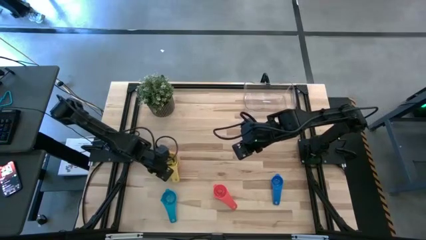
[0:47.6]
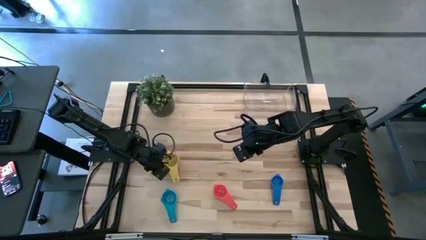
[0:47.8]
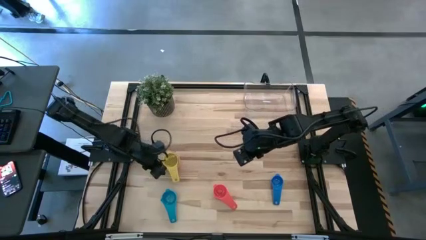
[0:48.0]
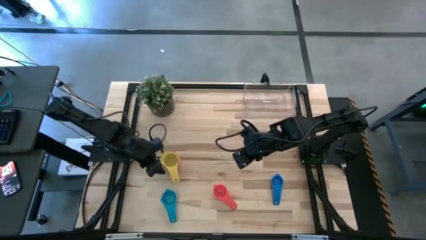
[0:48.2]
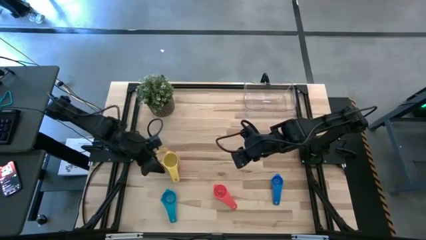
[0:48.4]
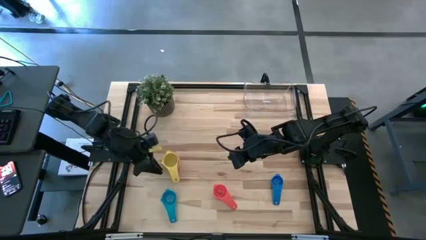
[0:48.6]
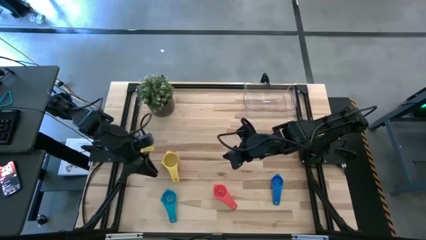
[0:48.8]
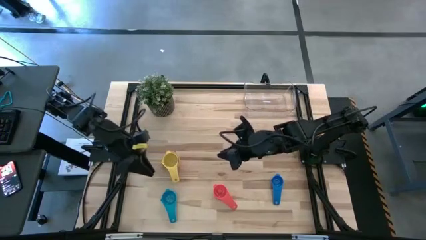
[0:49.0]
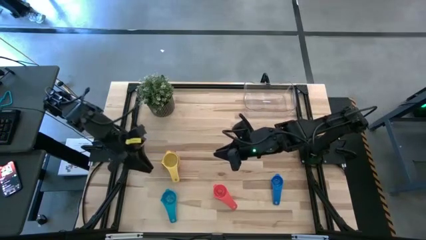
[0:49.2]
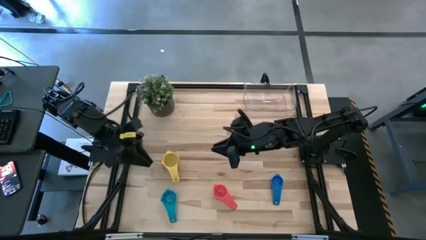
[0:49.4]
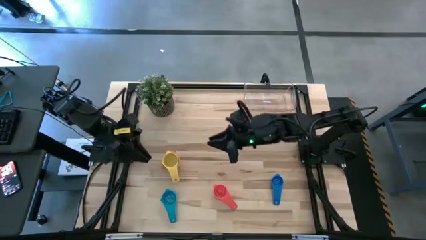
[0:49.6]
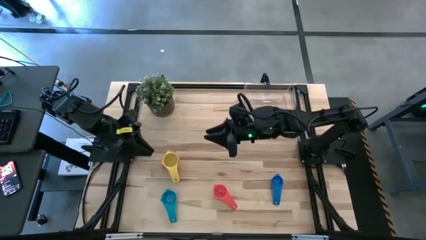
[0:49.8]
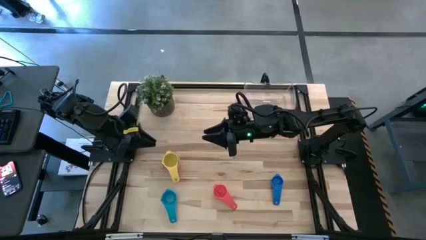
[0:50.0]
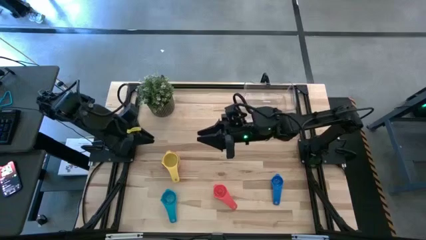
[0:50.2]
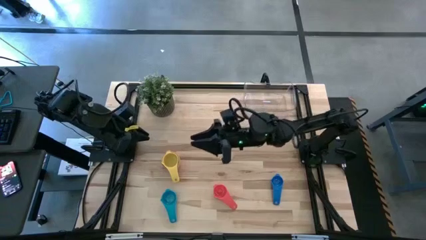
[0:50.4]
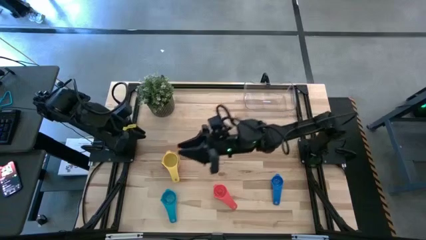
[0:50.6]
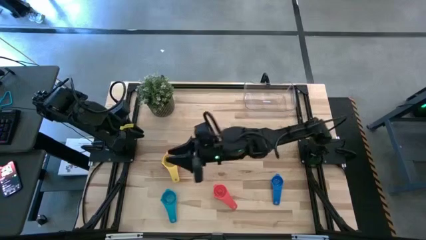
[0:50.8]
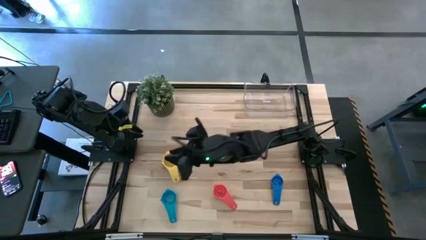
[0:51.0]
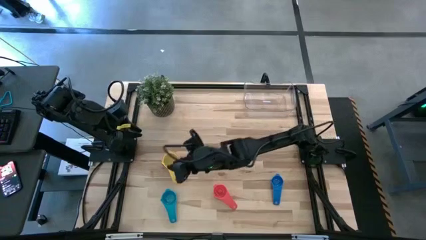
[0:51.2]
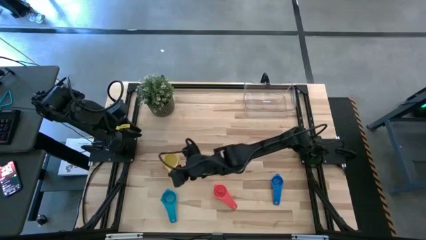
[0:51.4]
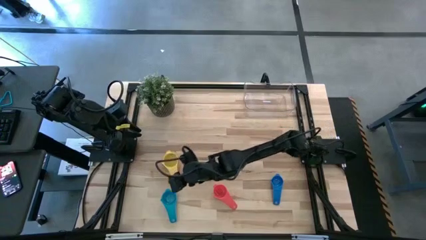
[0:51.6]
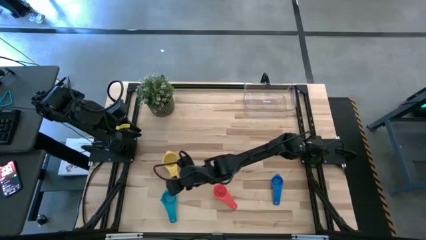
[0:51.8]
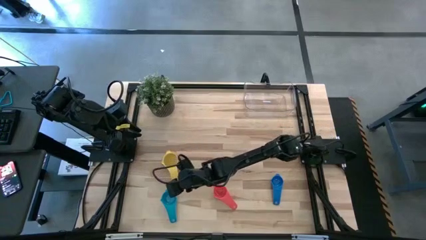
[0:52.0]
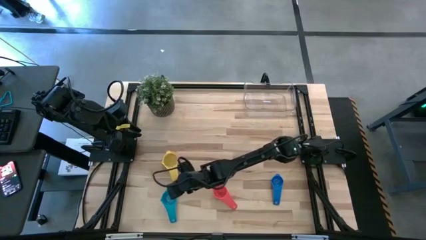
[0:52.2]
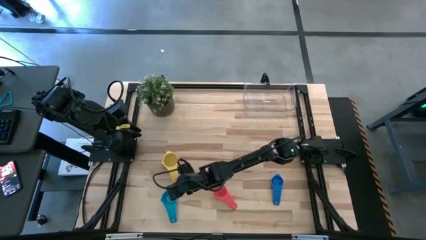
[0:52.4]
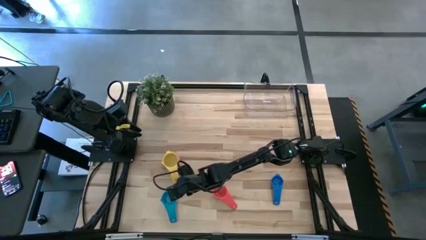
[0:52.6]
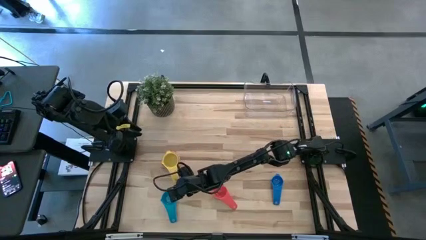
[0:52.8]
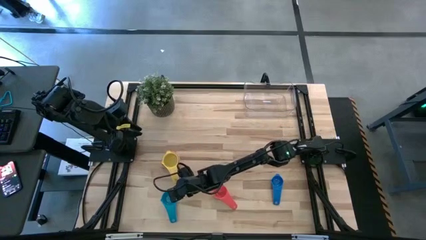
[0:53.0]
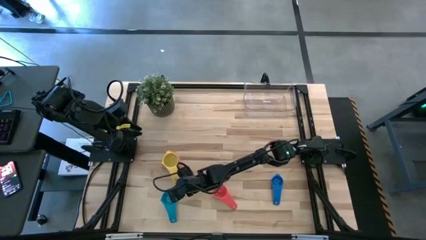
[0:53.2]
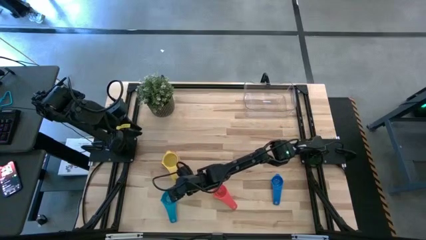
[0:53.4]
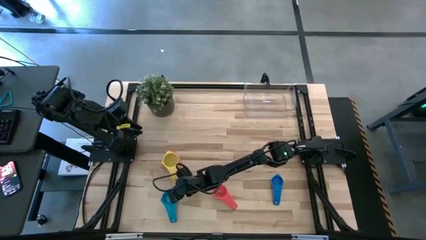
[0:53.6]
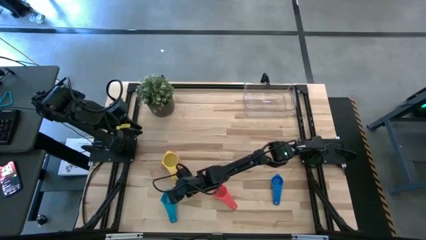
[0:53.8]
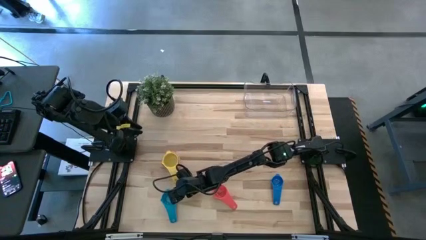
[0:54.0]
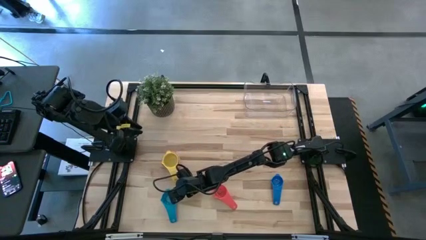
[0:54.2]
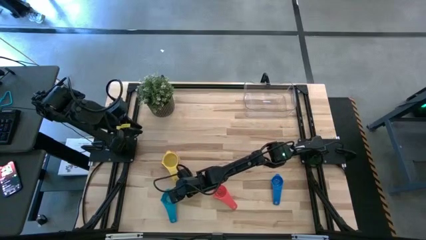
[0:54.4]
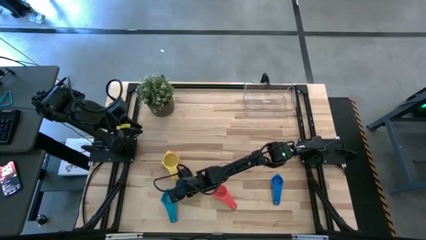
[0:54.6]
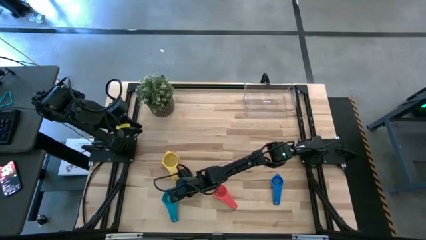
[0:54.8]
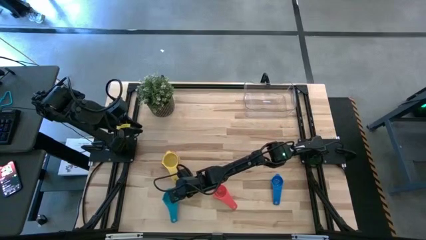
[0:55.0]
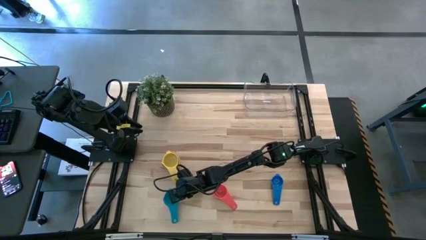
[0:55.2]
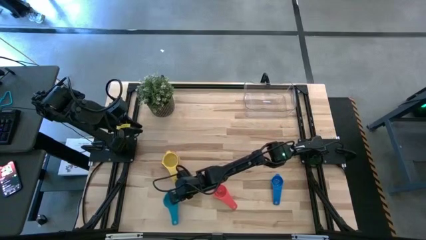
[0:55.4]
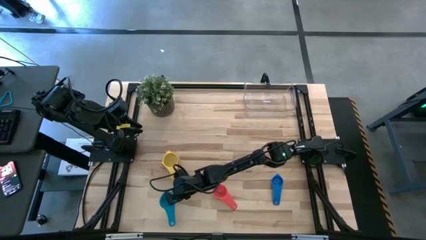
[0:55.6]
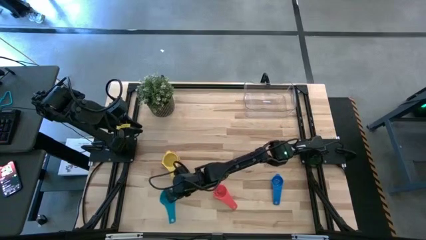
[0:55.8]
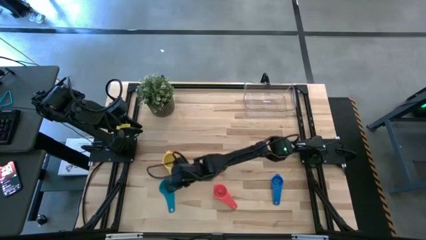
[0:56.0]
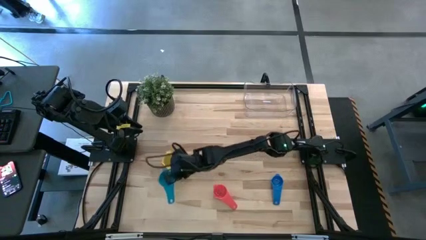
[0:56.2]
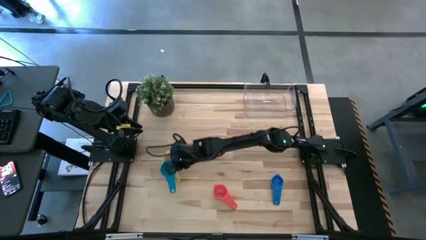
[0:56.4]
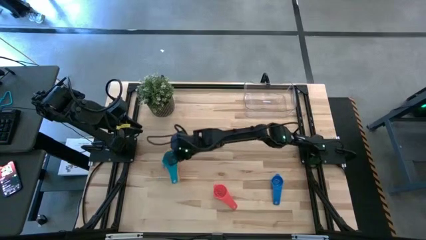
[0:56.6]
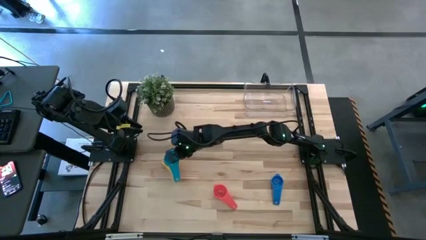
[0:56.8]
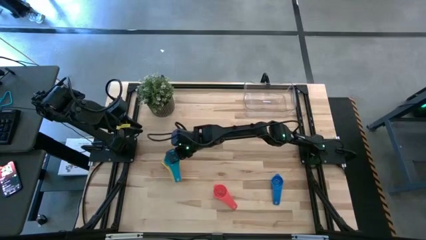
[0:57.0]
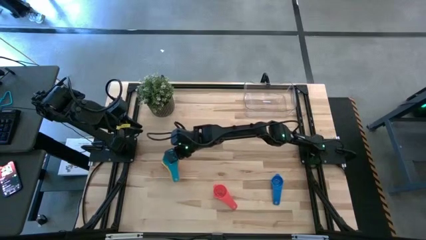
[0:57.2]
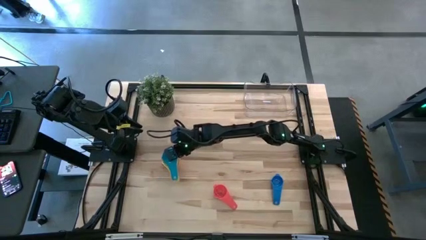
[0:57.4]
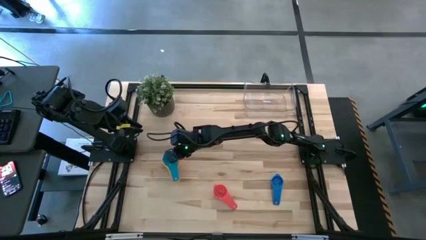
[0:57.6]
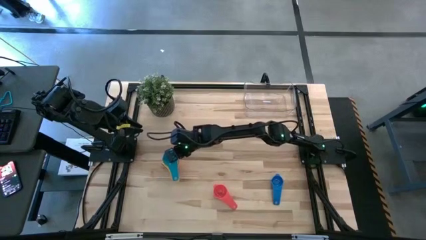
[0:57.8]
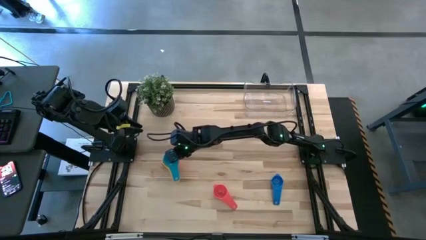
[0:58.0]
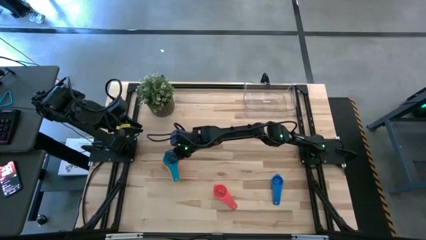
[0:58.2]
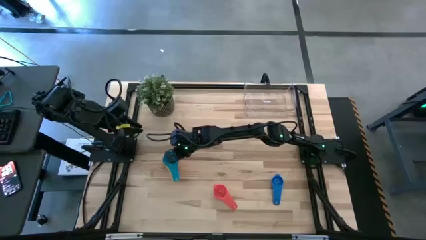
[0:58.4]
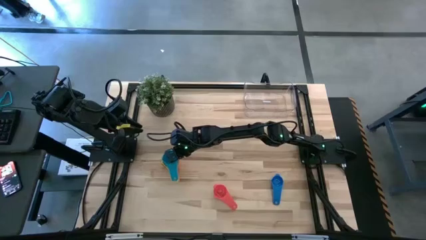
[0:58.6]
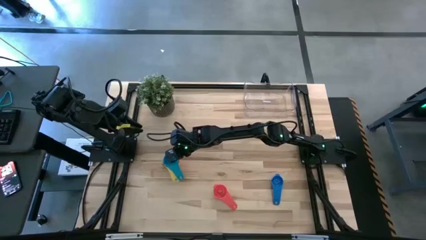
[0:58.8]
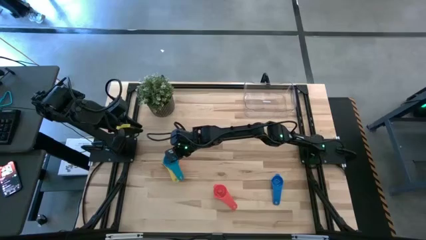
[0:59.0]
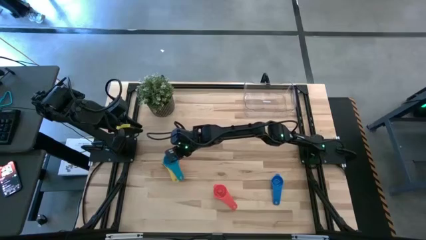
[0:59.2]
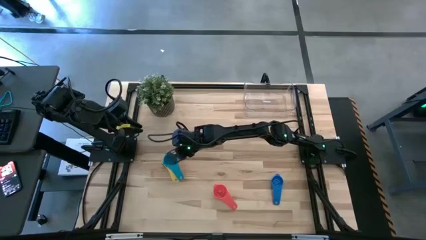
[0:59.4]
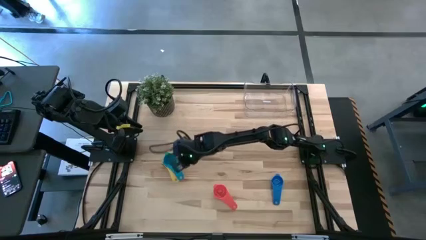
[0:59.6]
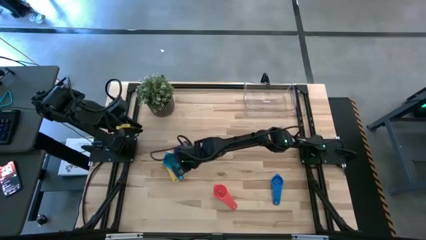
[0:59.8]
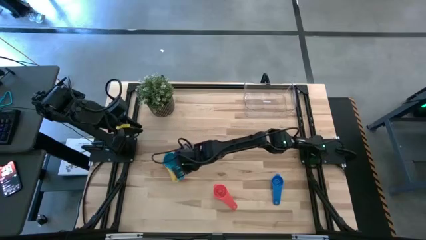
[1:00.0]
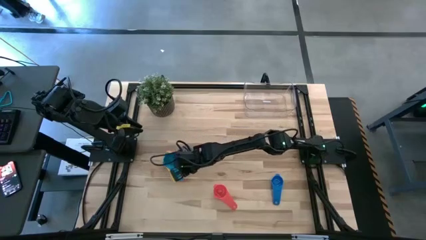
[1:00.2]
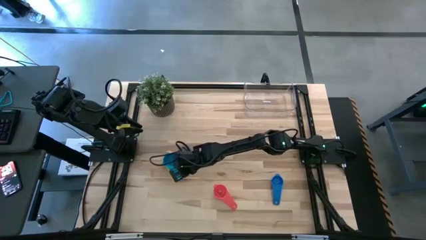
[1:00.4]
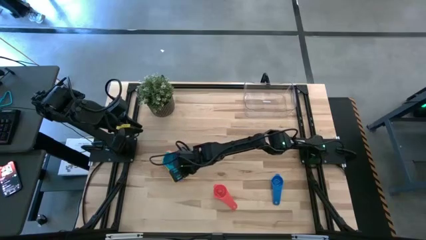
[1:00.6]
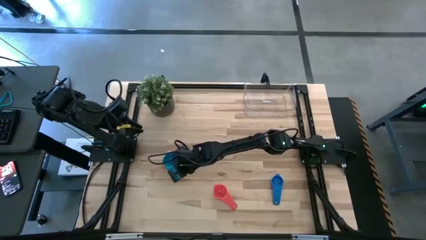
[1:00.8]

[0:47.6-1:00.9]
Task: Nest measuring cups in basket
Stack the light blue measuring cup on top of the yellow measuring cup

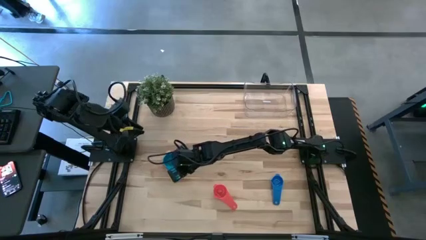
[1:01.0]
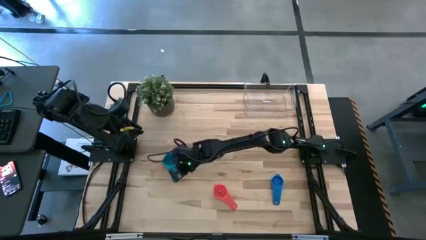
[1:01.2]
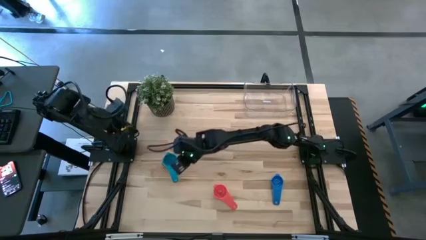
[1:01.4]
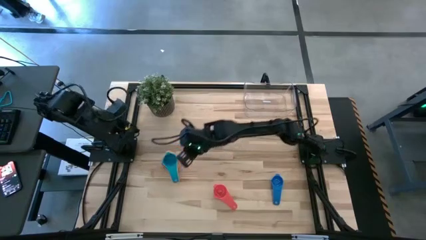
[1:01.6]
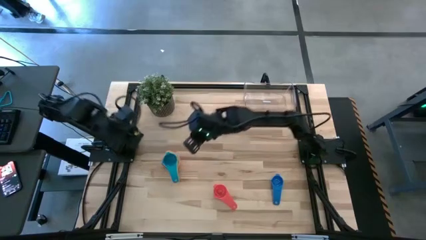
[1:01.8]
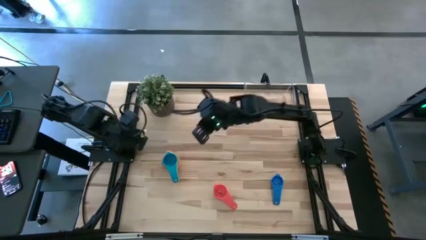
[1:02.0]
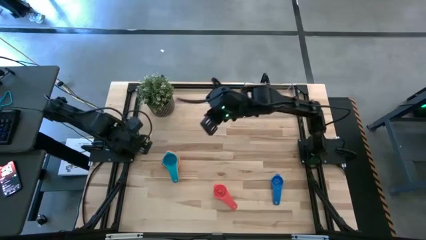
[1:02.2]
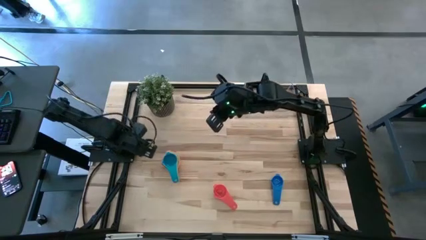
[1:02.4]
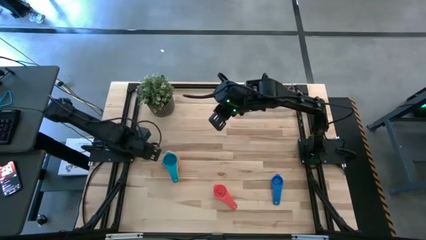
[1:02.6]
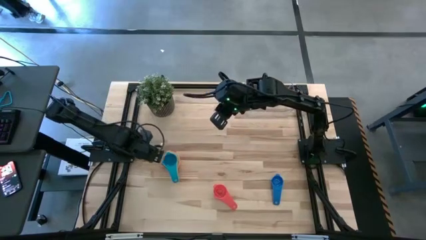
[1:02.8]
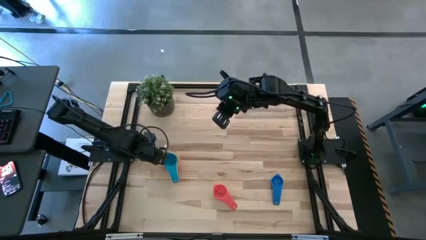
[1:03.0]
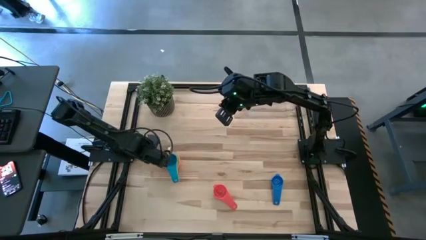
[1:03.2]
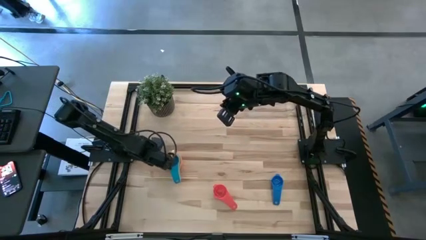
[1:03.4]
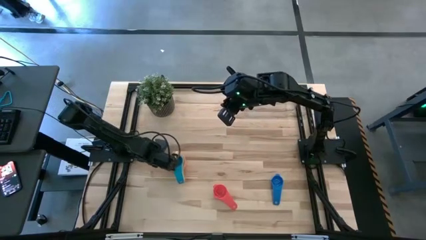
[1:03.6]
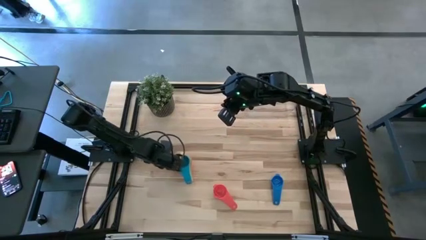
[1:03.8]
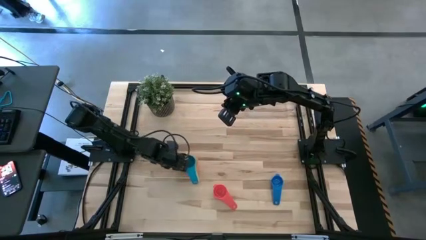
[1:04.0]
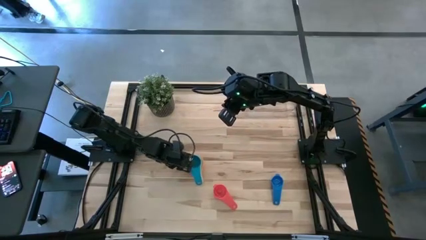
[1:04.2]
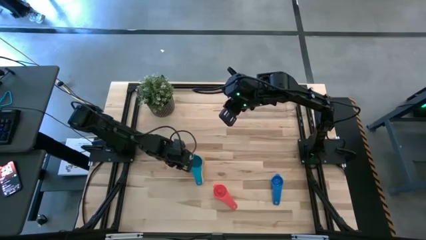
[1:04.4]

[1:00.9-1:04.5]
Adjust the nested measuring cups
